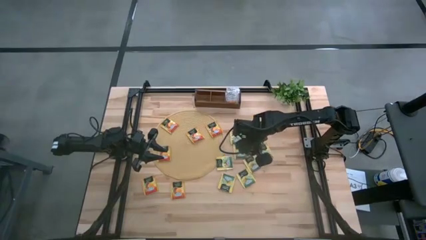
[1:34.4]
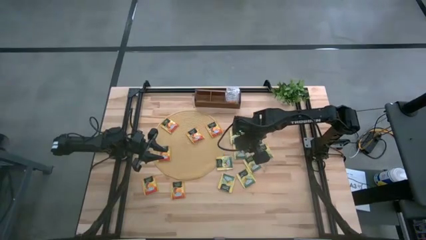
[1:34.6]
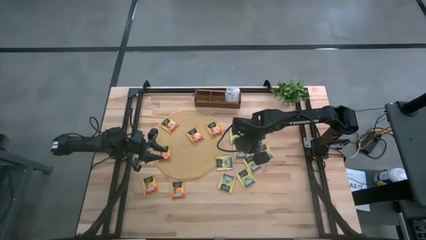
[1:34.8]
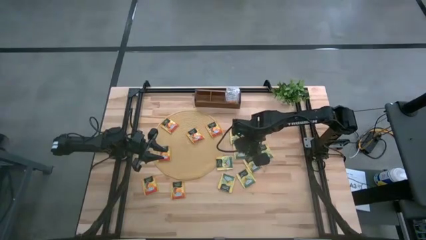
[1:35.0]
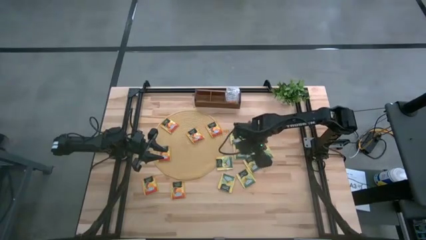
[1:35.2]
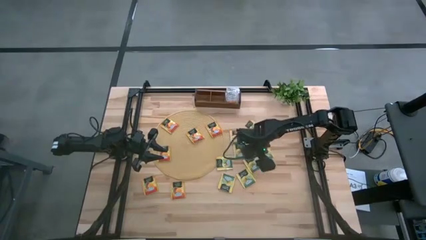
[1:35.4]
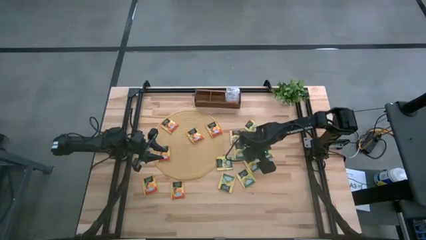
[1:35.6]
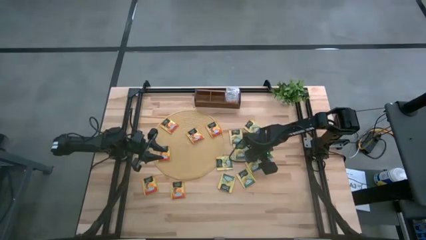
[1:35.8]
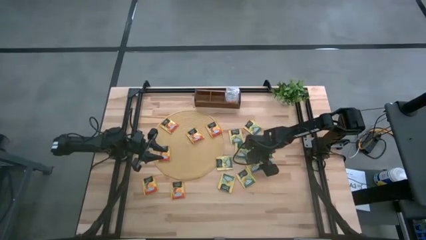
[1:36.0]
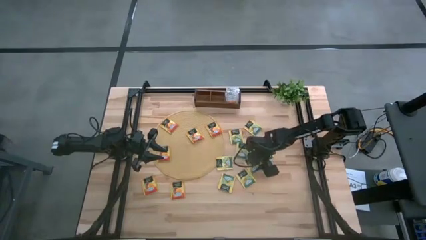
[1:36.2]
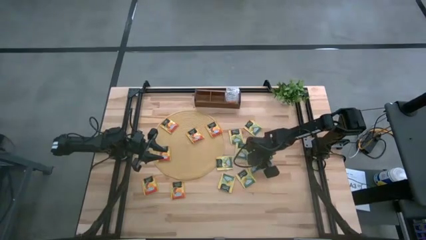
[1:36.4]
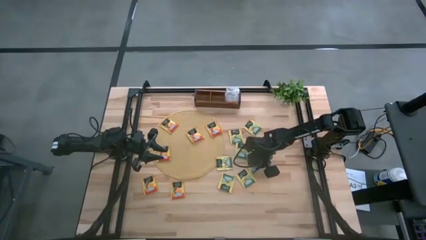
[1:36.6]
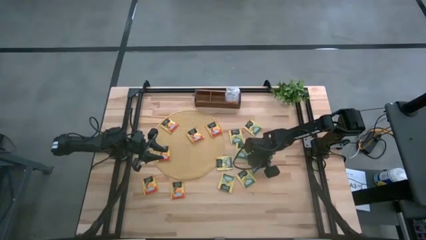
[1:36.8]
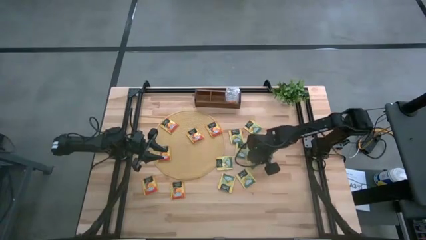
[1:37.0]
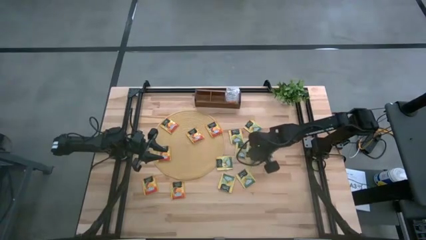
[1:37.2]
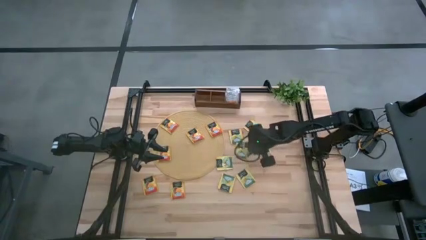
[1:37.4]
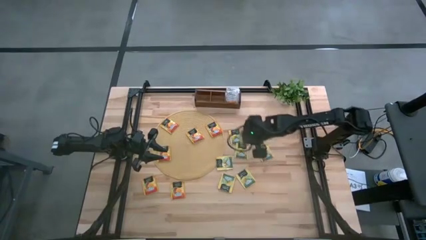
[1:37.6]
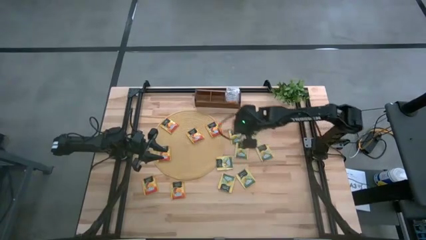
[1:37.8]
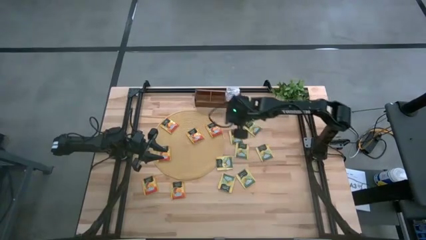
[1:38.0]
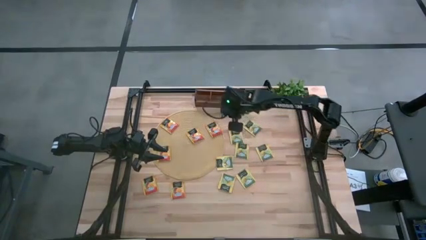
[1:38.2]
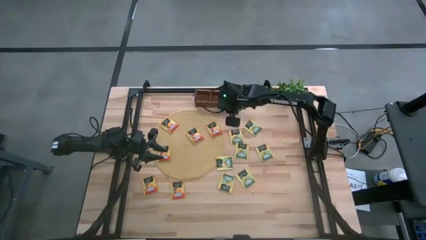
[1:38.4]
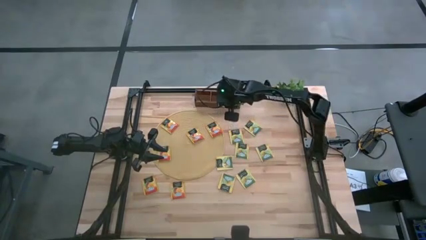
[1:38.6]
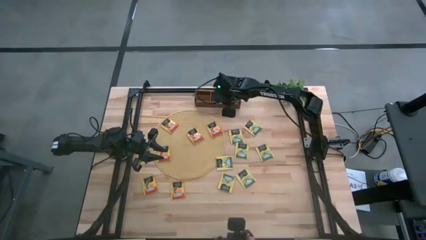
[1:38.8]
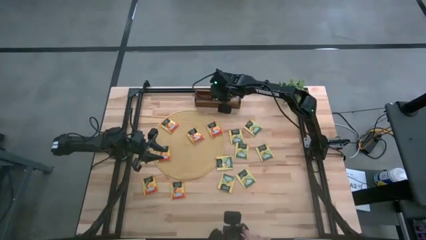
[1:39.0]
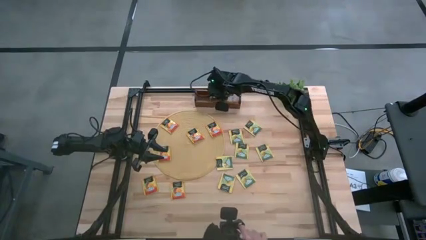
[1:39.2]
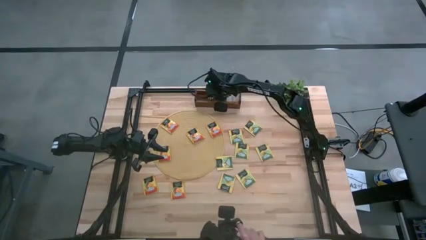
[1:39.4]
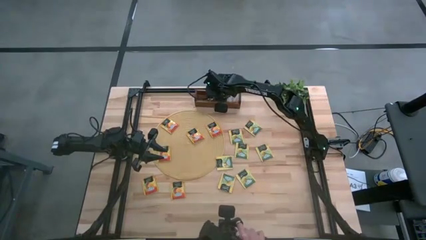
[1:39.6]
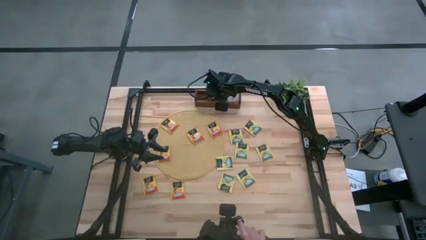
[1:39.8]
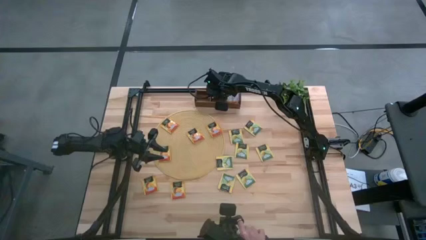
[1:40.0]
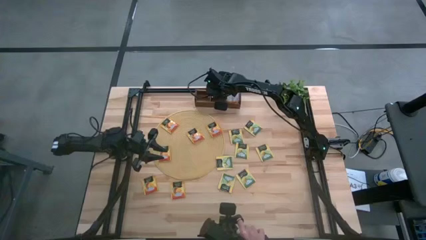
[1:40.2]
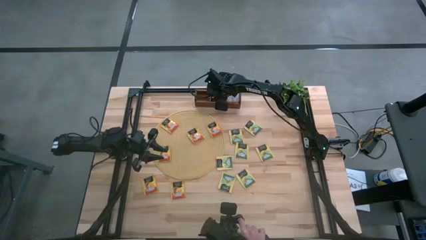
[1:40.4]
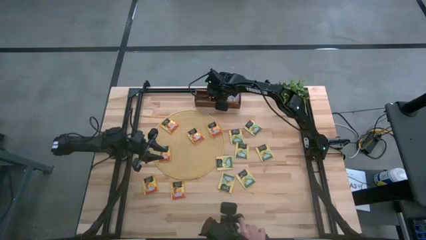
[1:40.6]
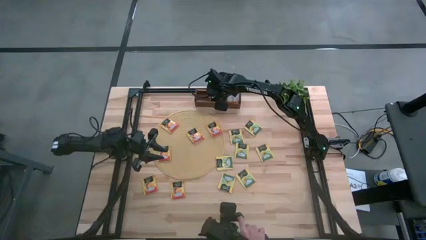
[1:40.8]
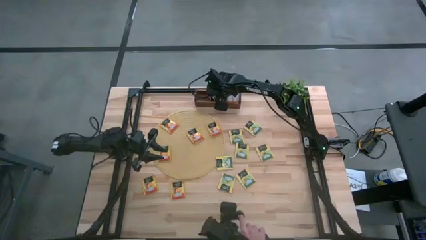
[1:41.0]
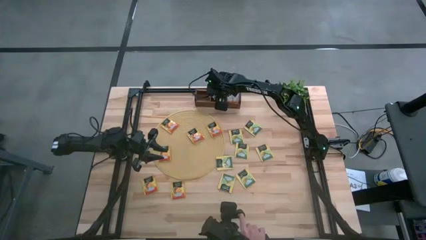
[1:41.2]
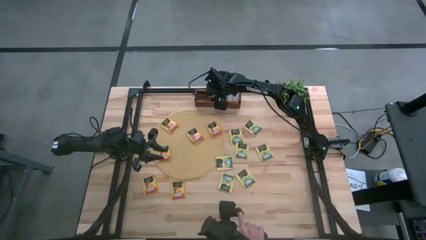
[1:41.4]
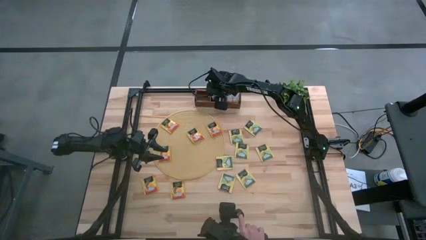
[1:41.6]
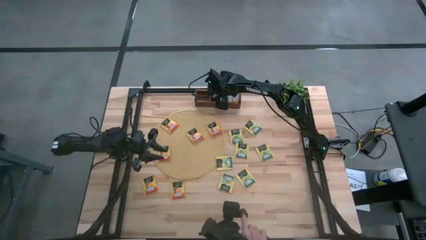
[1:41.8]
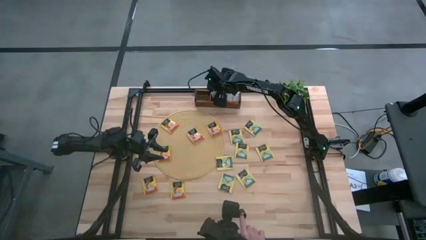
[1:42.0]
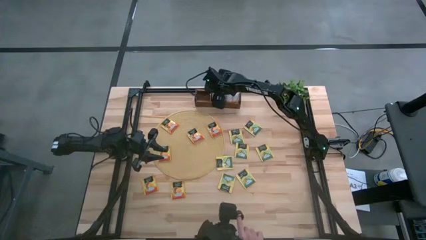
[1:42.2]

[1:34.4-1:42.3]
Task: Pick & Place Tea
Put the yellow tea bag into the middle section of the wooden organizer

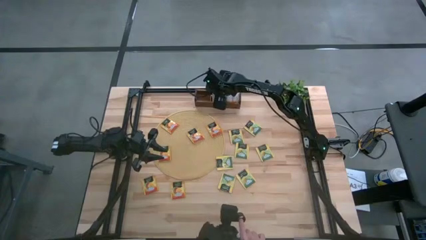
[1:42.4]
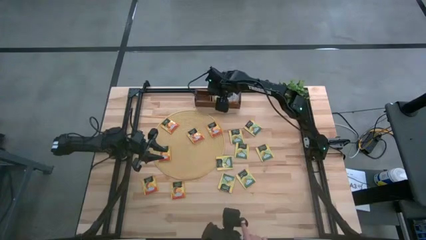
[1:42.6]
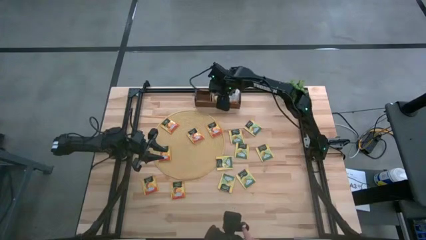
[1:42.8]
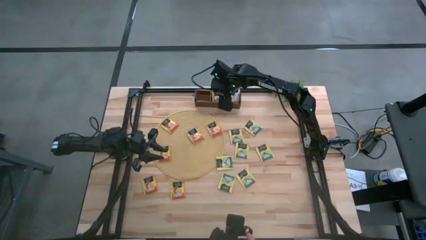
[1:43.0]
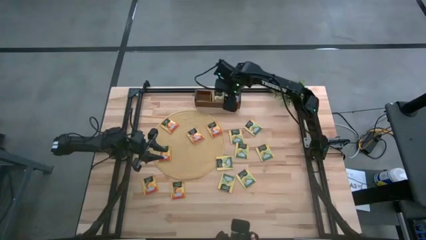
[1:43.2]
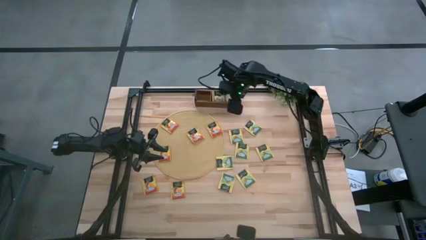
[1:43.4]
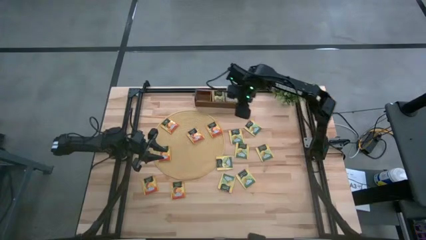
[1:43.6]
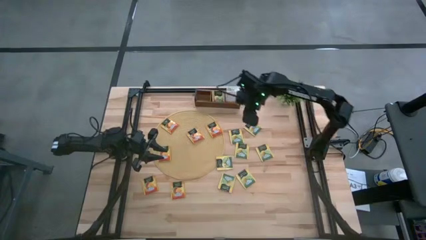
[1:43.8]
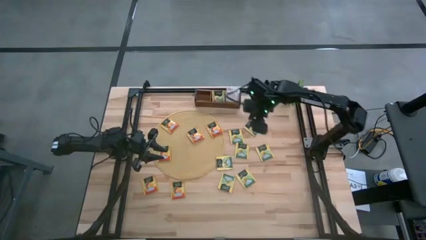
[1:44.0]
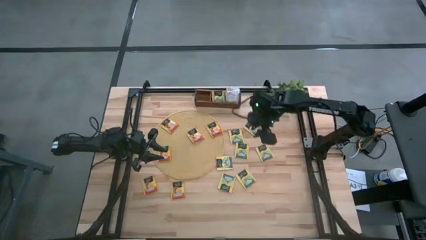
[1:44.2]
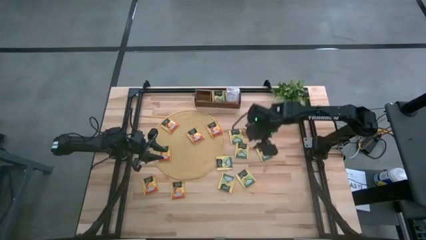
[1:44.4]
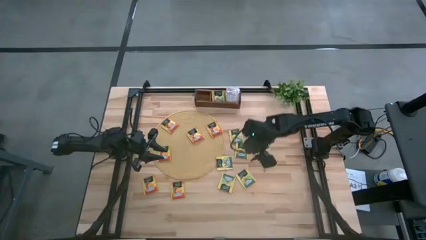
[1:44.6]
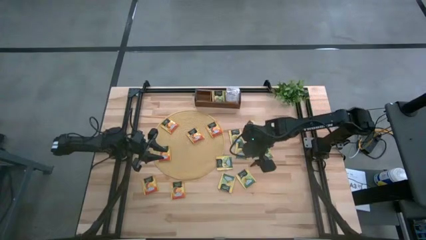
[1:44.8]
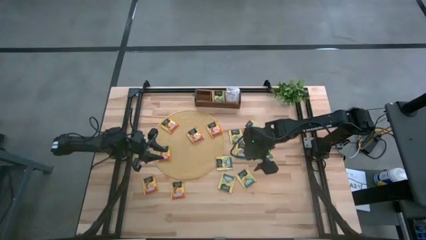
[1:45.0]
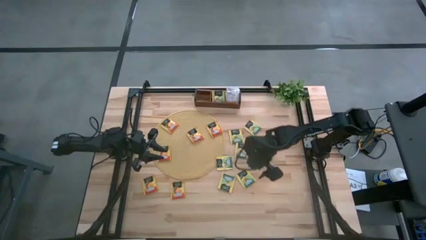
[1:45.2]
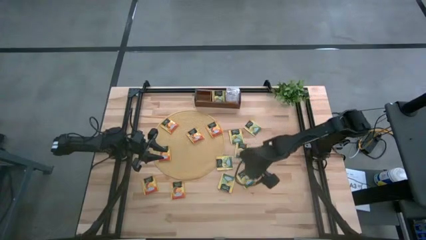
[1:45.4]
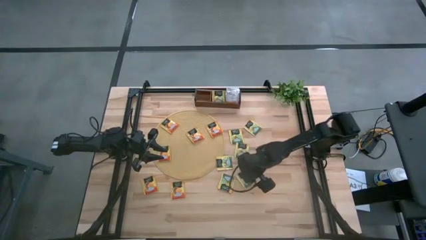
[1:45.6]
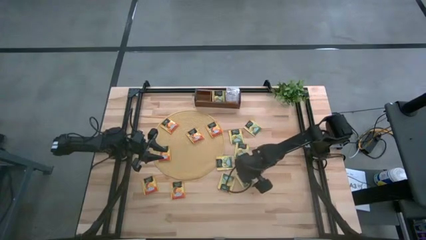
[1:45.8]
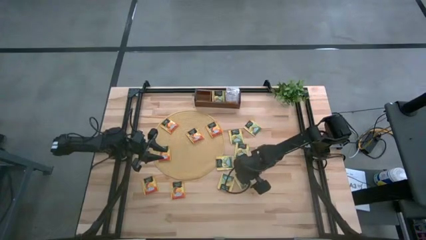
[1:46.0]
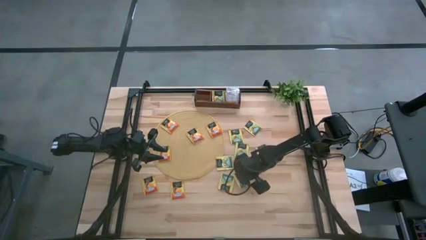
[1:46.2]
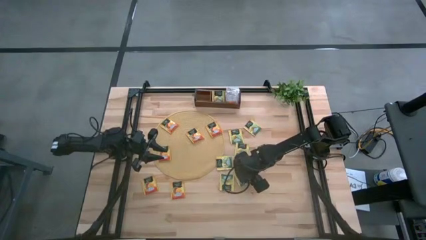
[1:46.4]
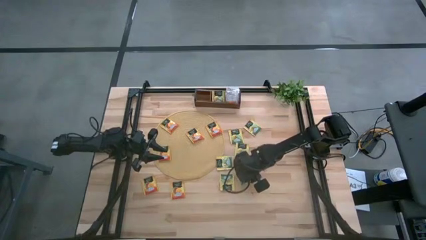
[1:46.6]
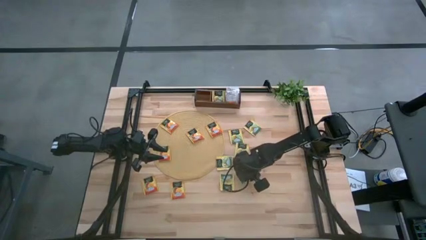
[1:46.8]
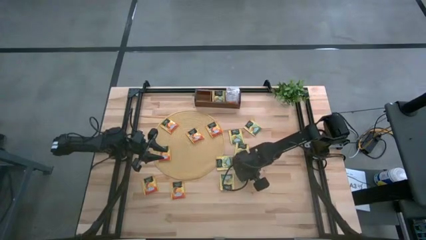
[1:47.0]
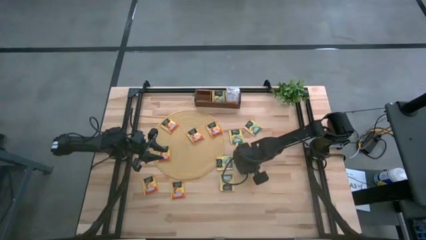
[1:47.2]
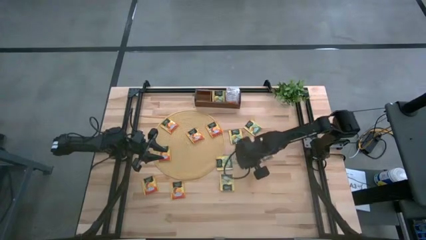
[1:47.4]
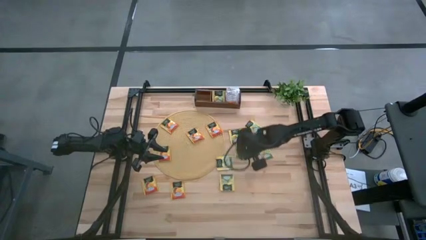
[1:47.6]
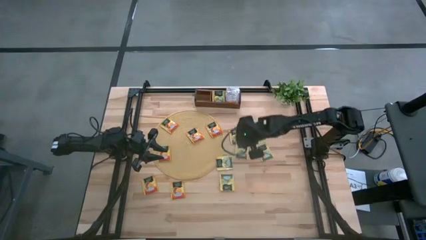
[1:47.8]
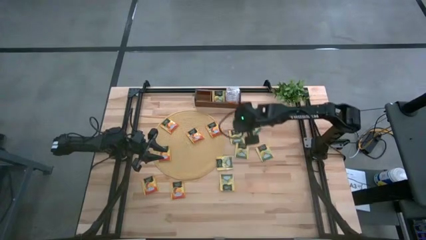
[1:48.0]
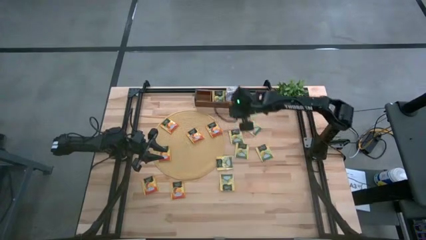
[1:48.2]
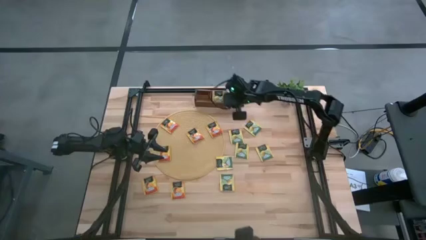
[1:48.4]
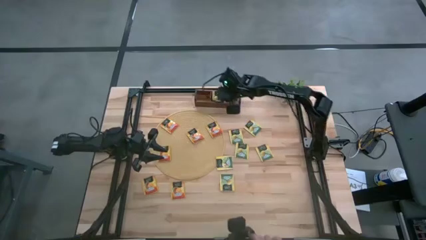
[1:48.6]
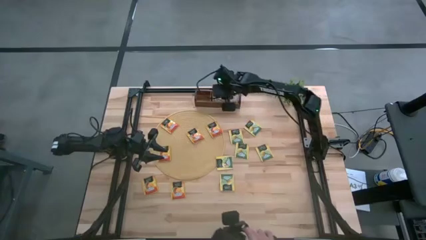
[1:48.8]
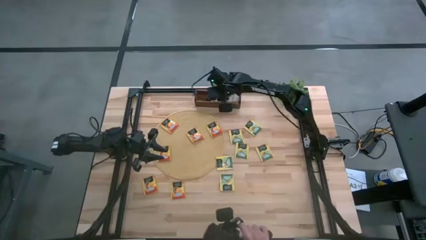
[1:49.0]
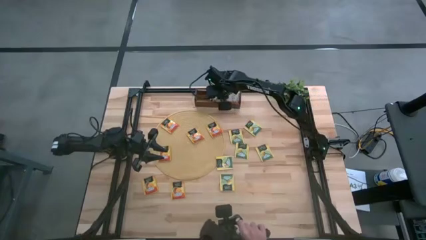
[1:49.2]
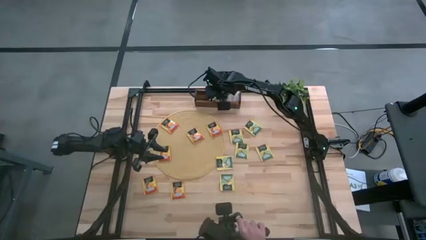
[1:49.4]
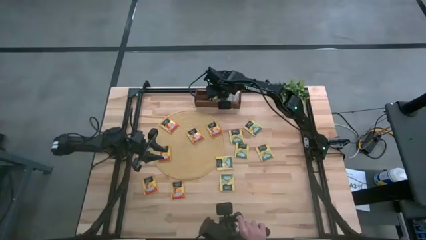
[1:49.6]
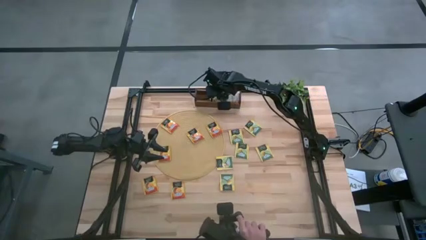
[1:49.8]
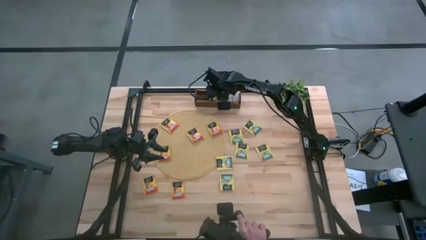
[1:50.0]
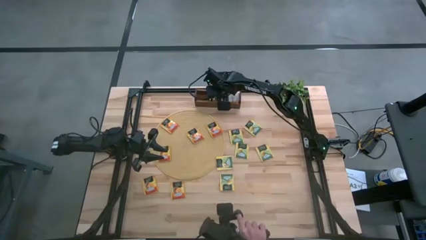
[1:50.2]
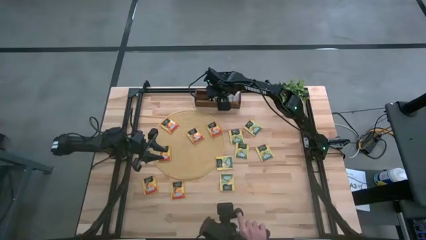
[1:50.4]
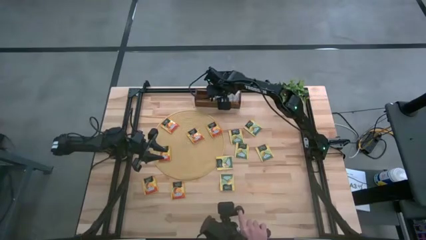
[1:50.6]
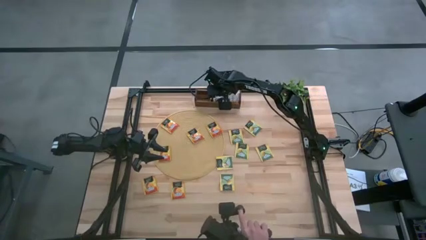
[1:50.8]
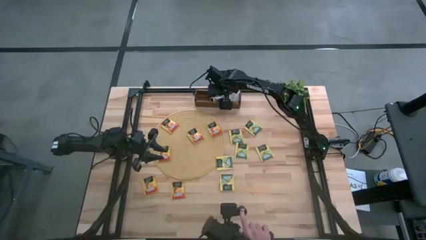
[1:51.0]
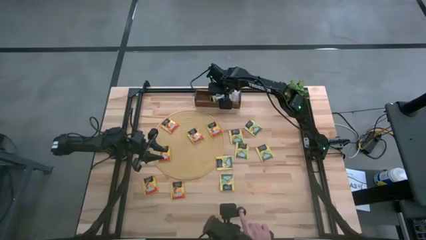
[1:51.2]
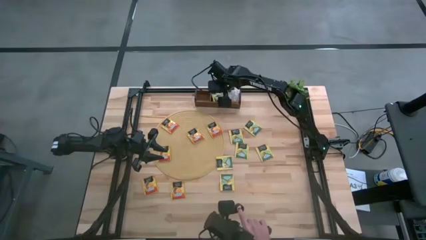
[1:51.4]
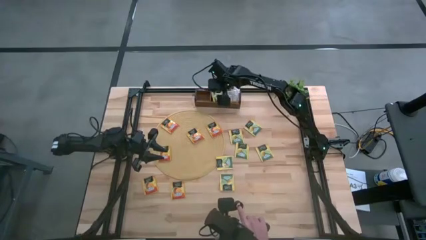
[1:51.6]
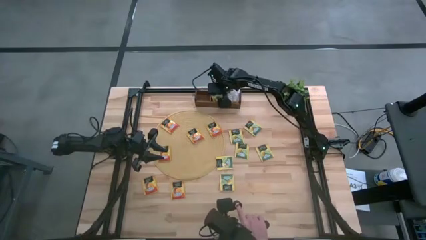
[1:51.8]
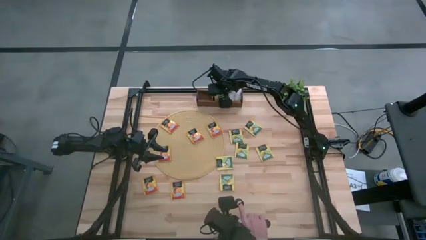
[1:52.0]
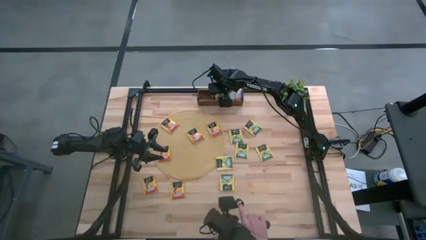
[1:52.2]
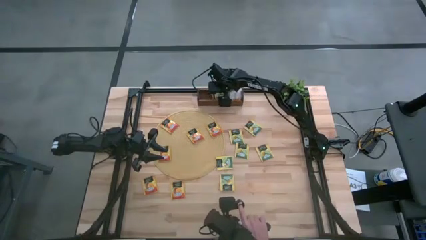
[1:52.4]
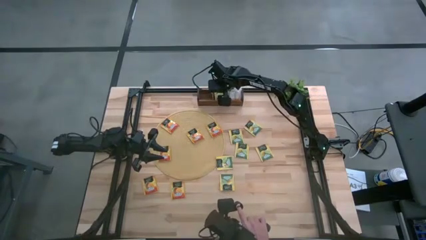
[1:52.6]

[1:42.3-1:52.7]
Put the yellow tea bag into the middle section of the wooden organizer
